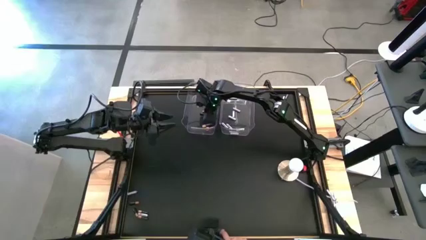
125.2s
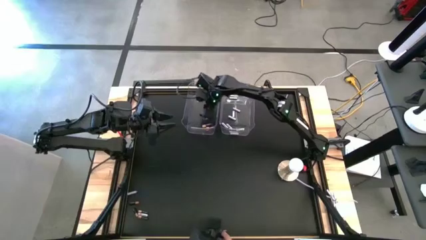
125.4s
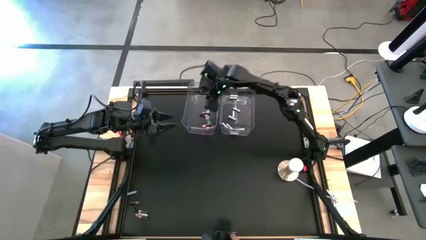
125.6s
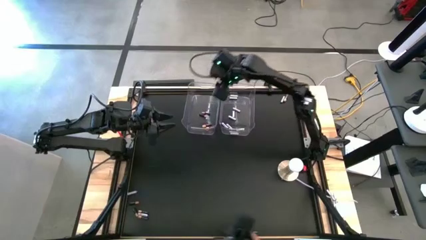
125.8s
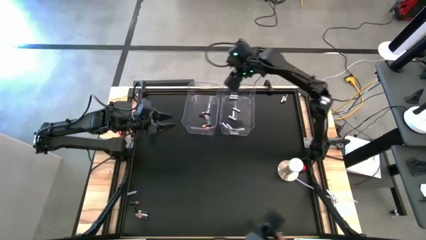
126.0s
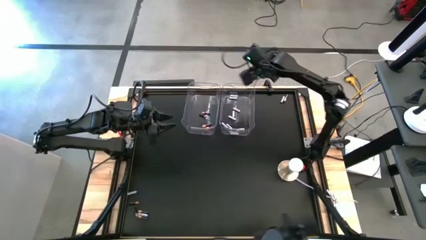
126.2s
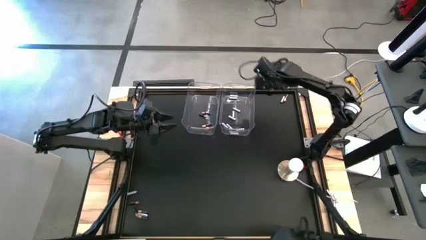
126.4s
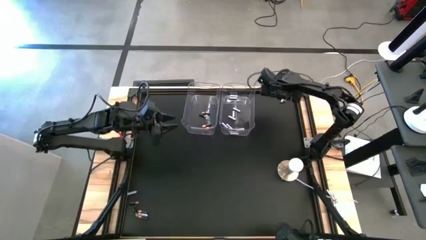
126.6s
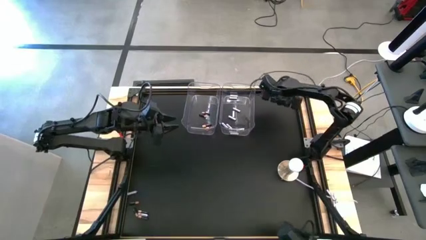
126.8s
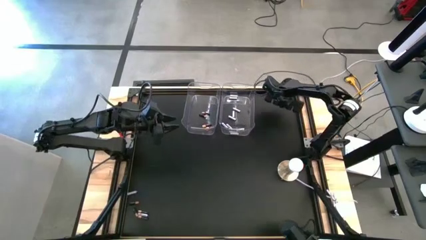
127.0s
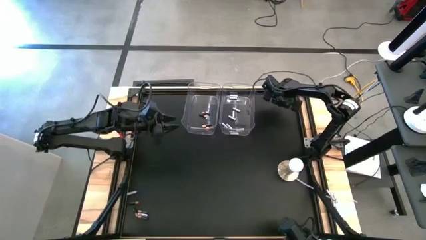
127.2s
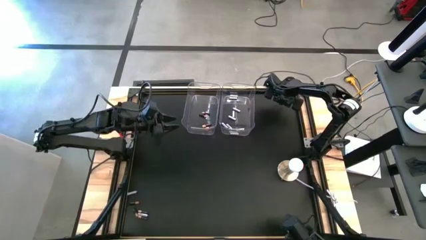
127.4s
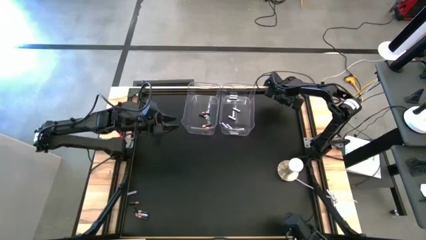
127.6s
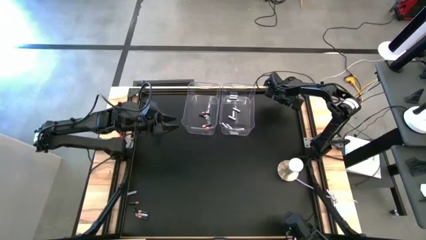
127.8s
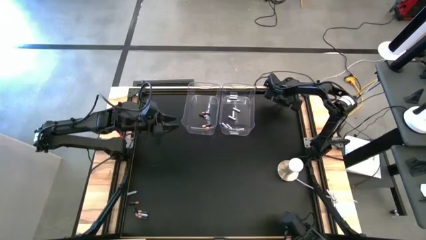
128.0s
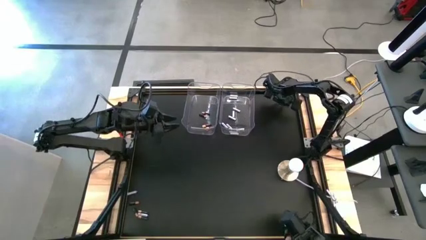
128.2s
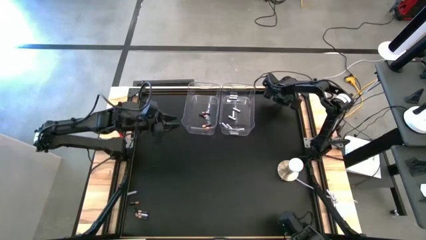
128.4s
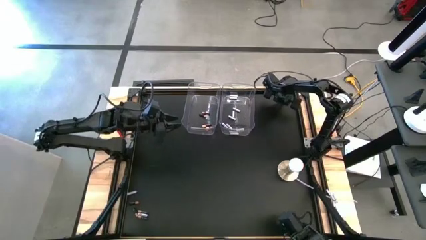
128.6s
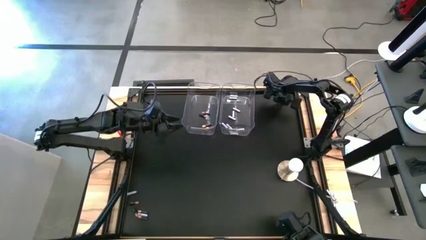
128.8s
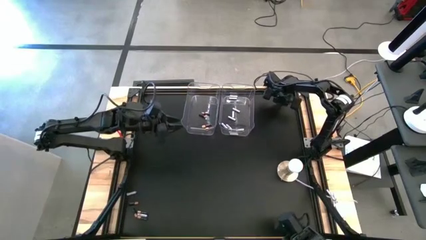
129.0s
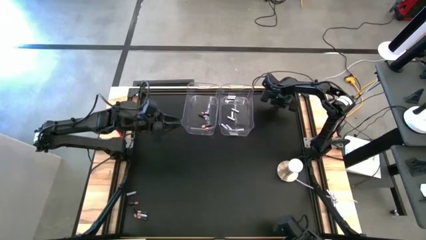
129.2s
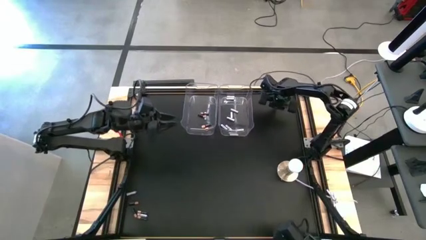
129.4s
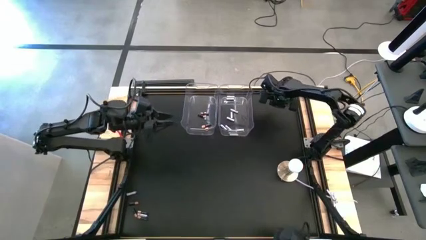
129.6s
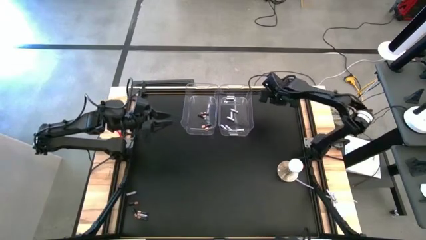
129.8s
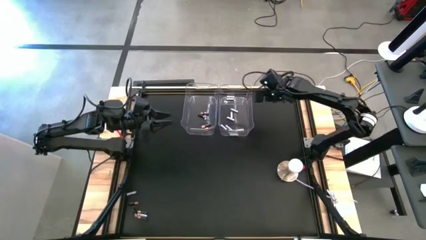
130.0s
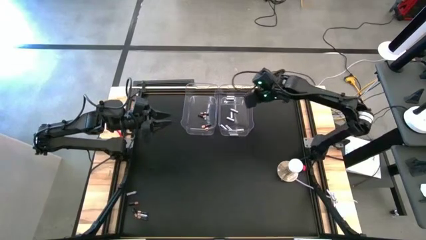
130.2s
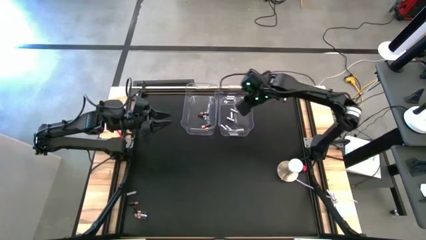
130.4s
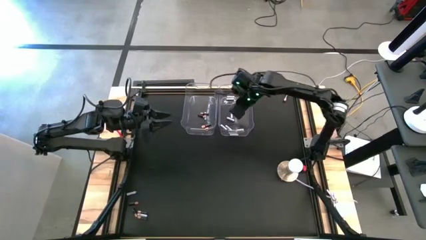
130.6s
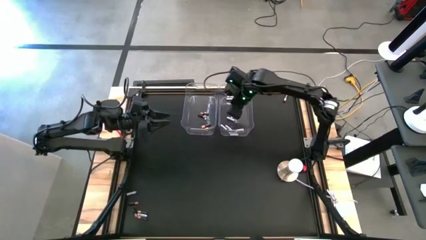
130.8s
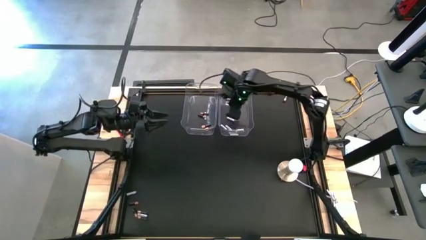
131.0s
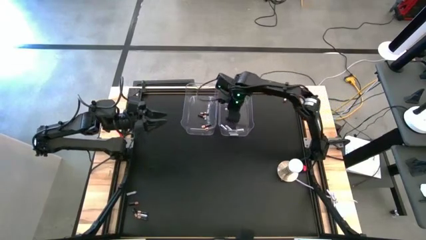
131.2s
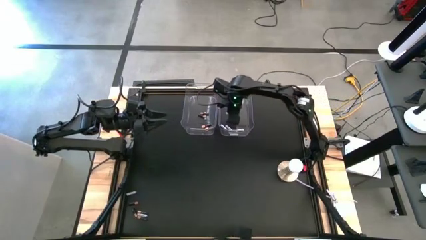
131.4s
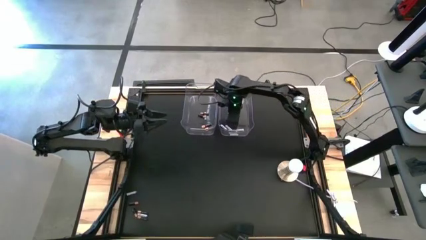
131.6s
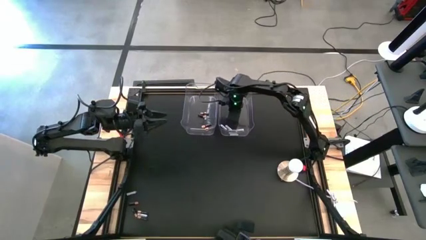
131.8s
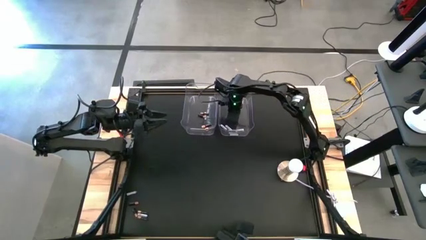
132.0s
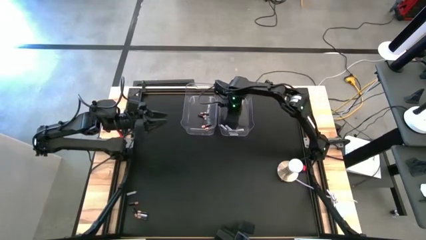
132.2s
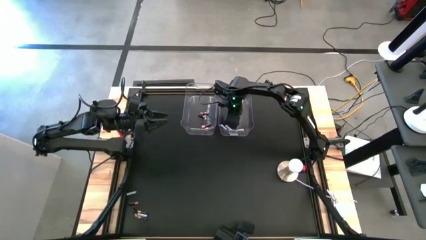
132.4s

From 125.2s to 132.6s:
Task: Sort batteries
Put the white battery into the right transparent bin

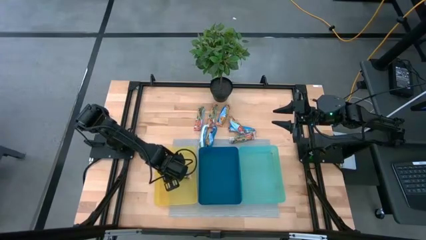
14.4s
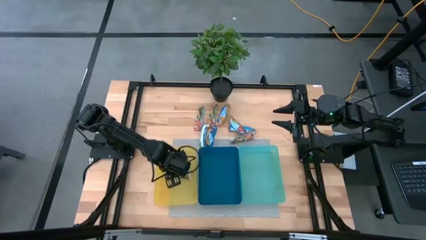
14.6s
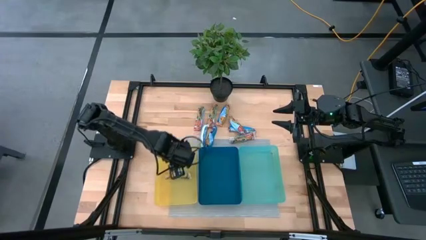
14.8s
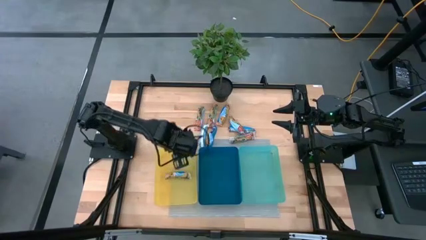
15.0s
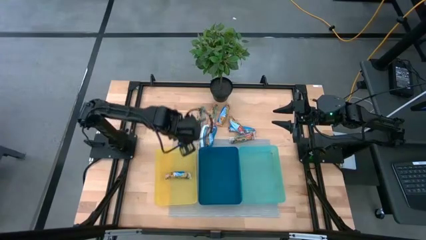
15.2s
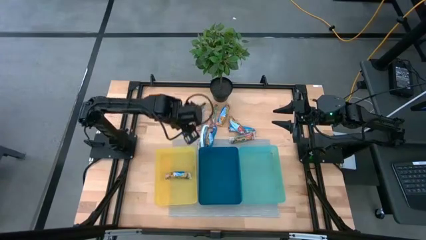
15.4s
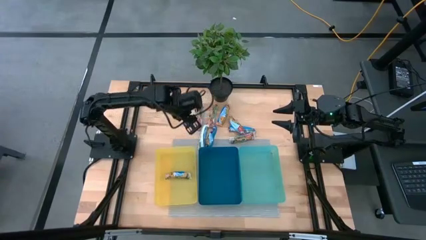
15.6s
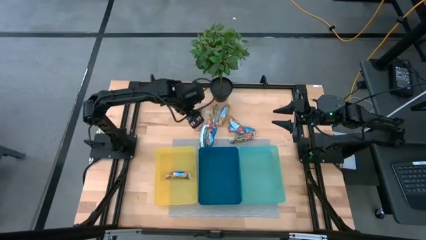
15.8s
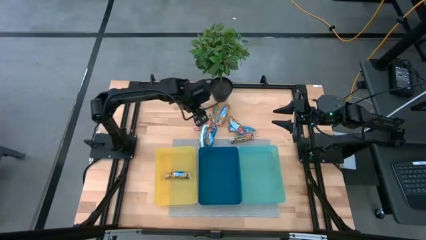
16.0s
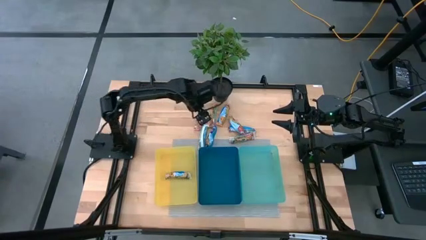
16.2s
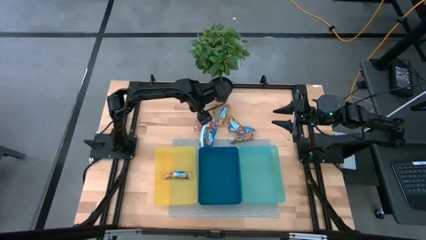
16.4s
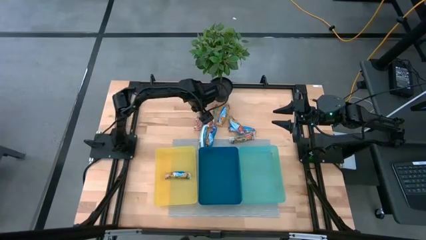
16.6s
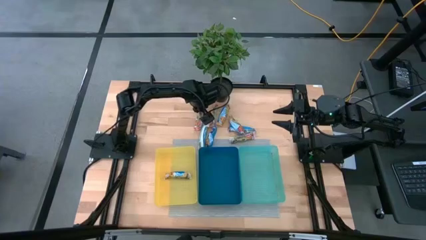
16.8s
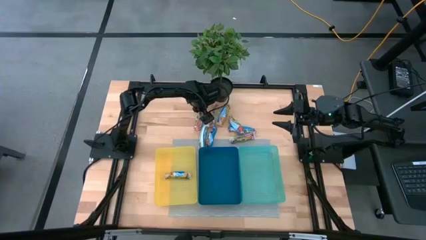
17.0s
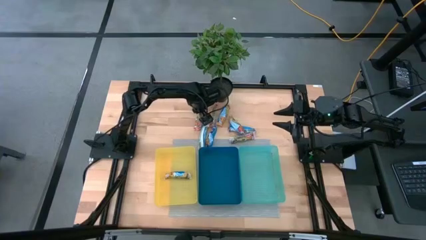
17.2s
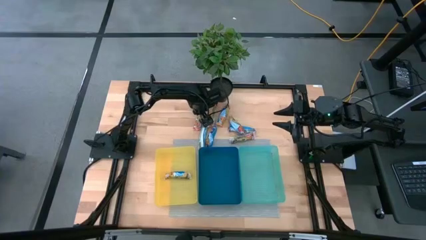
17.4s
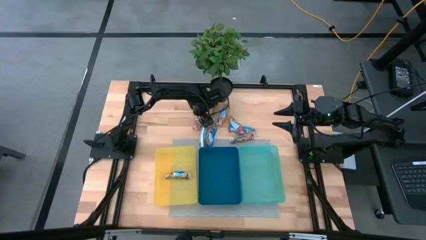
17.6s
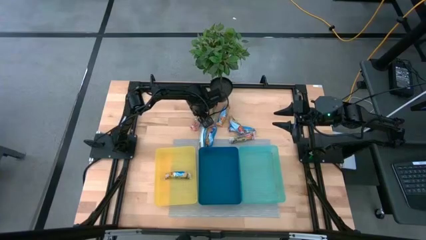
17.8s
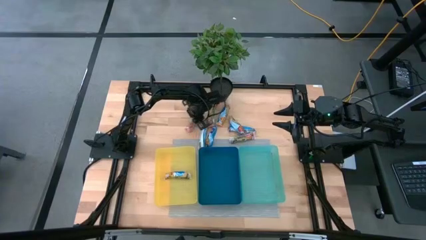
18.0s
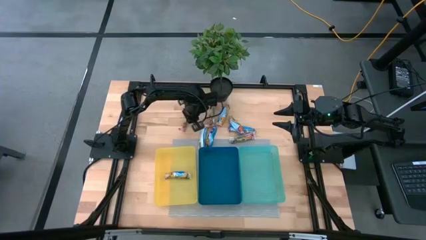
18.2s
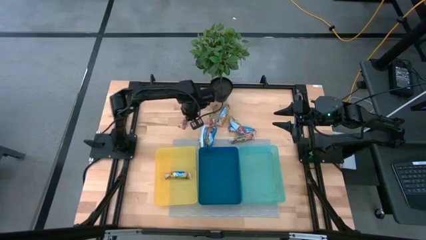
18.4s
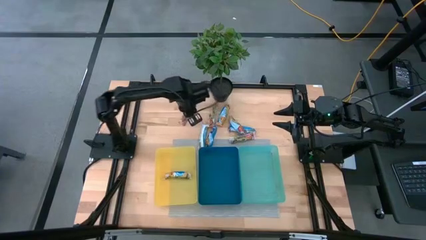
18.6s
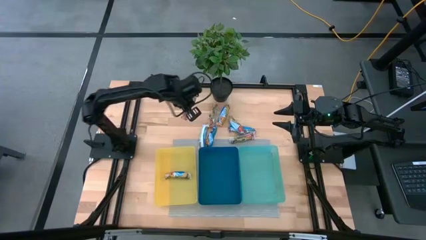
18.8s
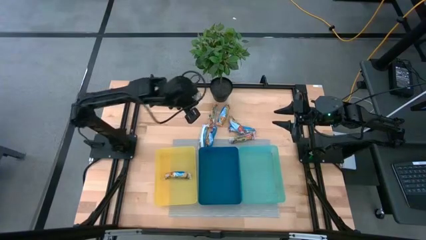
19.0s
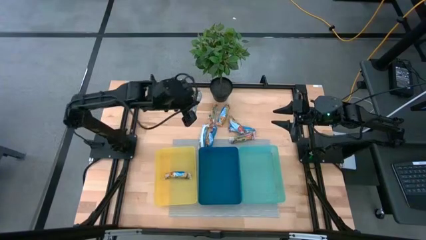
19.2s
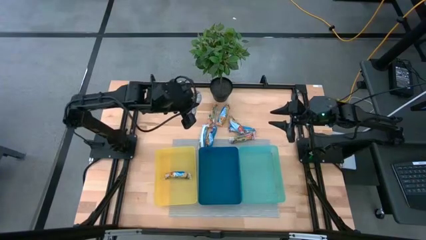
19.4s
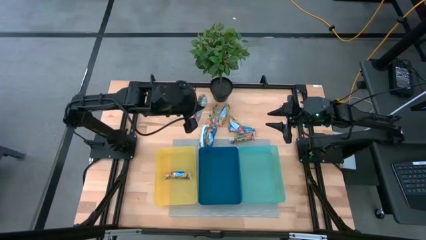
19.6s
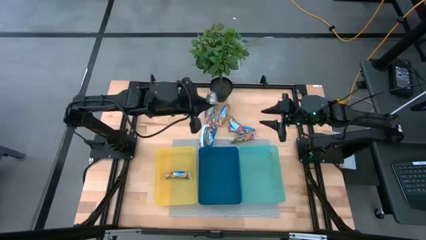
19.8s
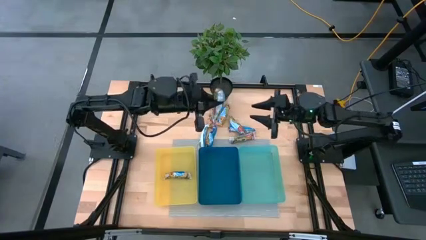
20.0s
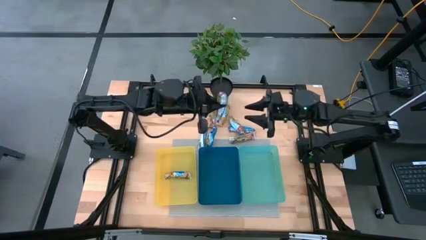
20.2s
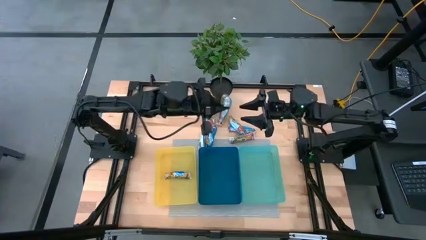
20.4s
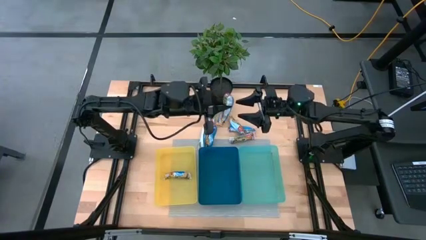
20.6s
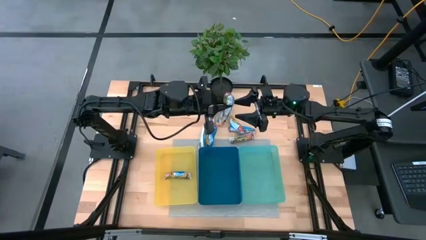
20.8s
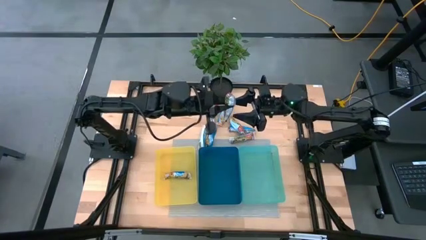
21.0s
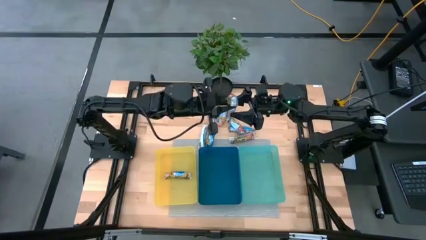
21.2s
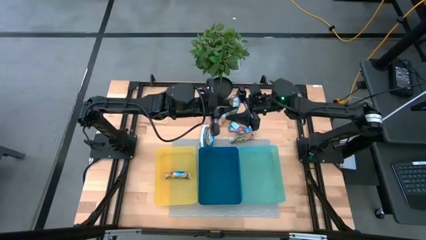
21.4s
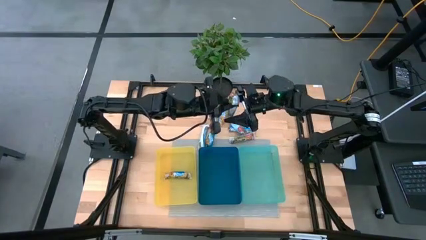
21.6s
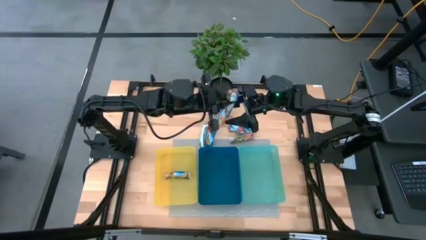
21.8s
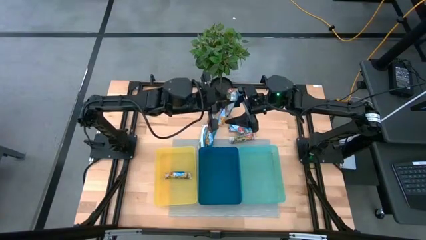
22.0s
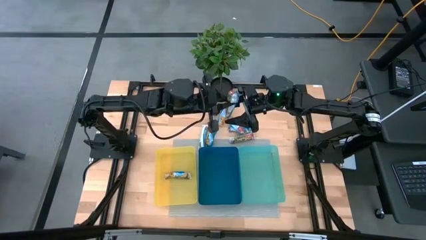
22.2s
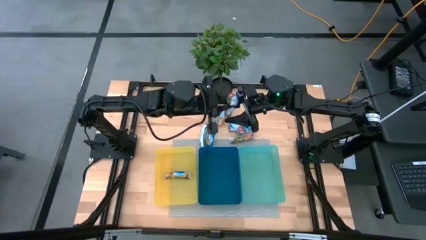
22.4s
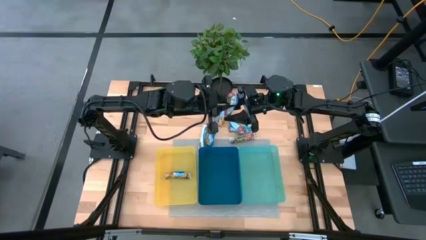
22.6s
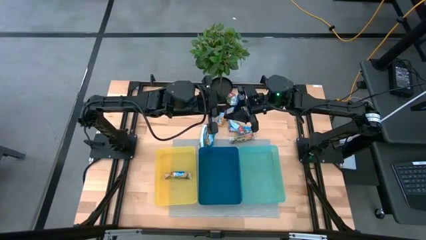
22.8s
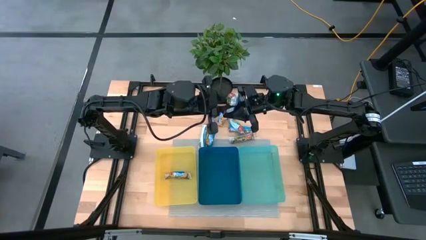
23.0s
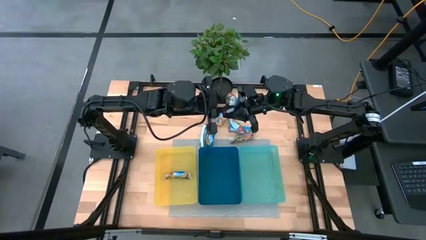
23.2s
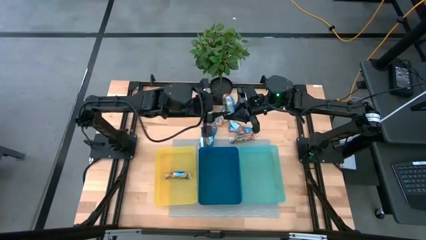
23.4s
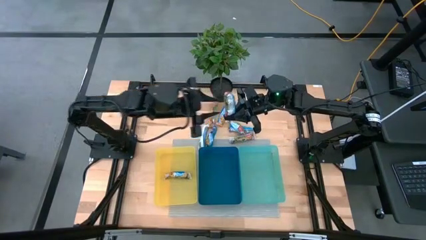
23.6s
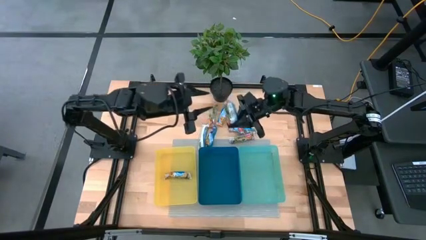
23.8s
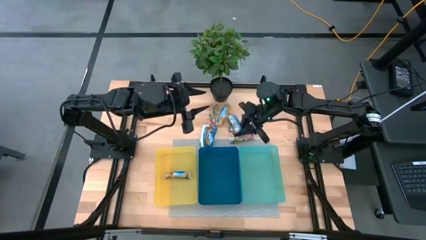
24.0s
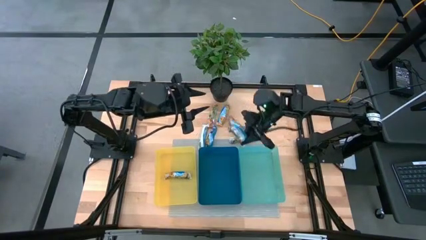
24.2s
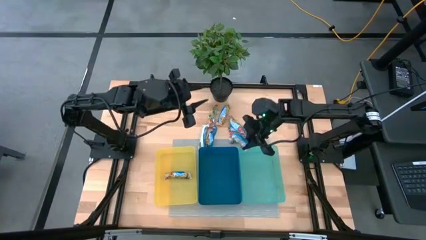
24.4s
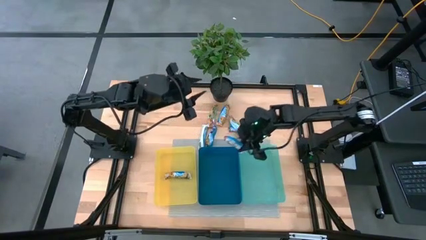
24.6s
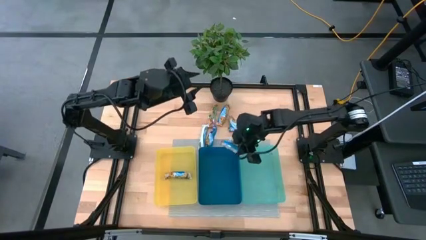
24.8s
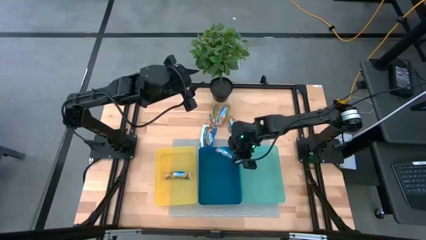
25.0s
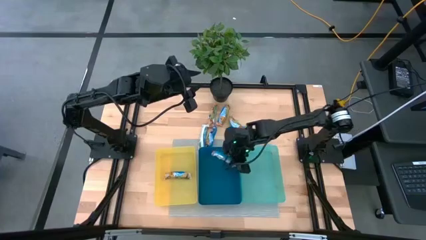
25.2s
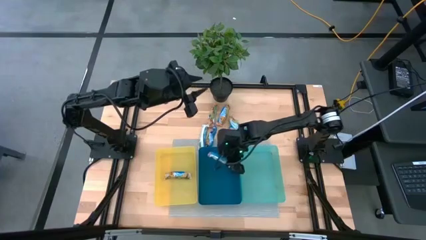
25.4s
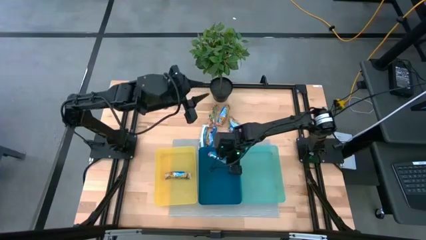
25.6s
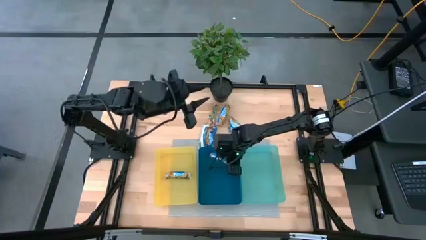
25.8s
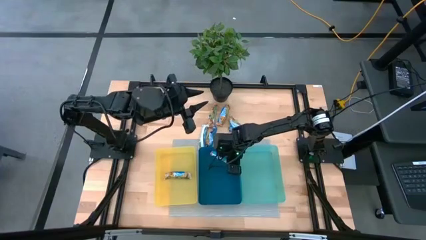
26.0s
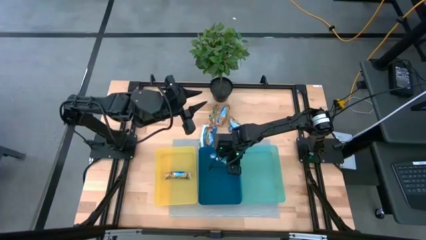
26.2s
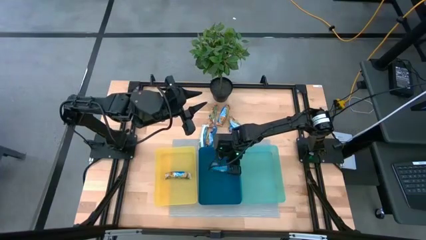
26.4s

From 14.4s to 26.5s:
Task: Pick and place Granola Bars by type
Put the red granola bar into the blue bin
